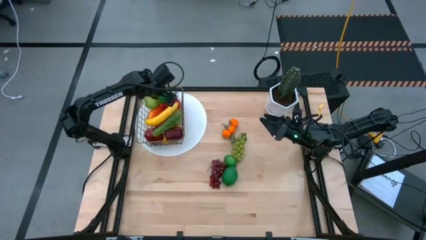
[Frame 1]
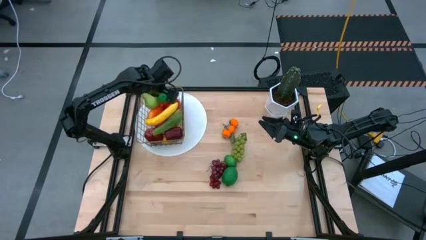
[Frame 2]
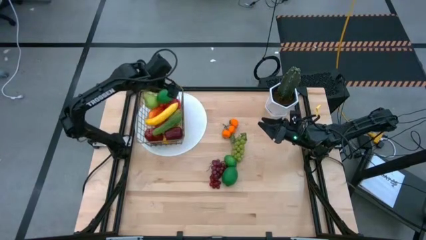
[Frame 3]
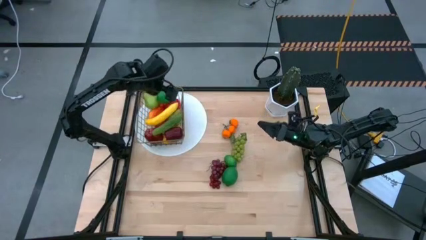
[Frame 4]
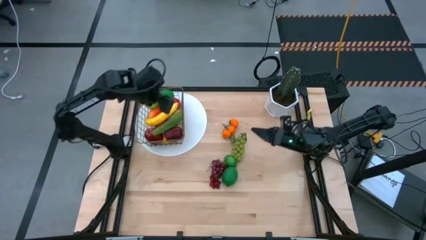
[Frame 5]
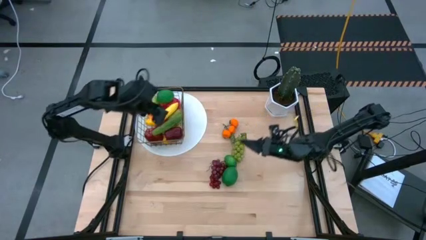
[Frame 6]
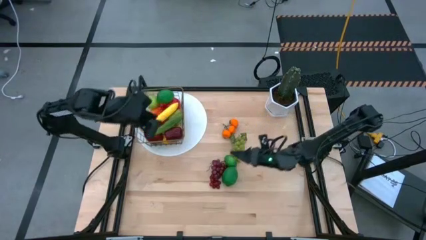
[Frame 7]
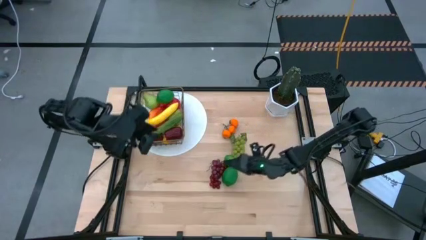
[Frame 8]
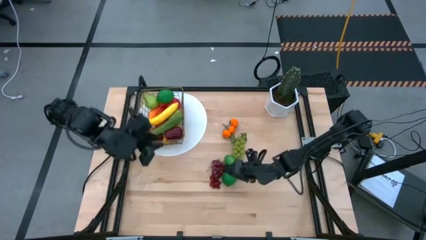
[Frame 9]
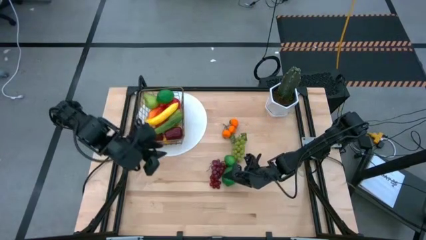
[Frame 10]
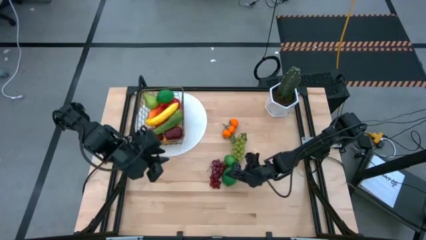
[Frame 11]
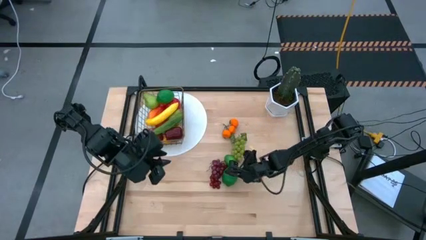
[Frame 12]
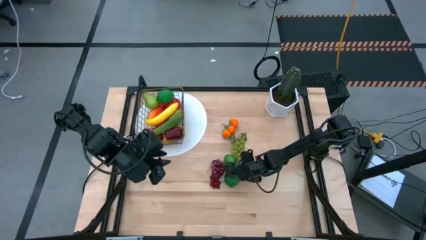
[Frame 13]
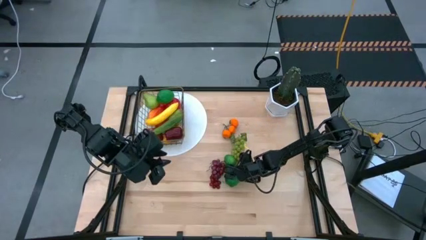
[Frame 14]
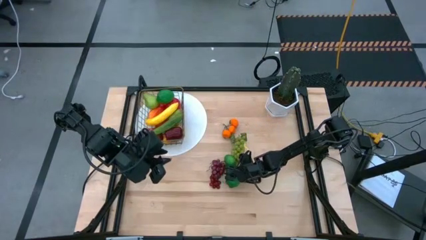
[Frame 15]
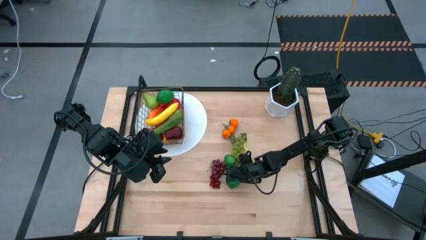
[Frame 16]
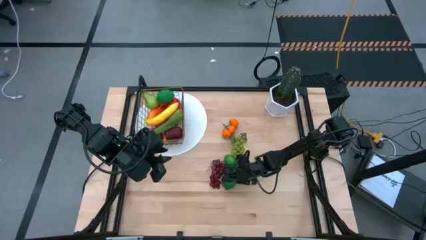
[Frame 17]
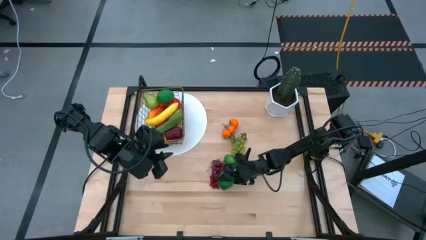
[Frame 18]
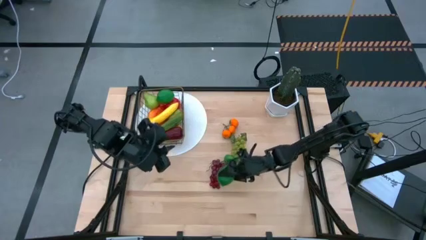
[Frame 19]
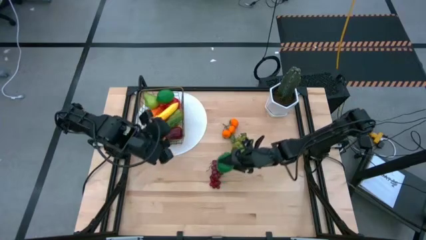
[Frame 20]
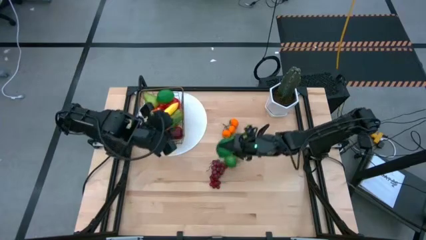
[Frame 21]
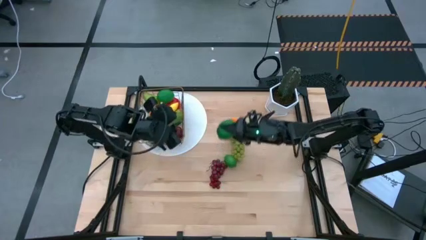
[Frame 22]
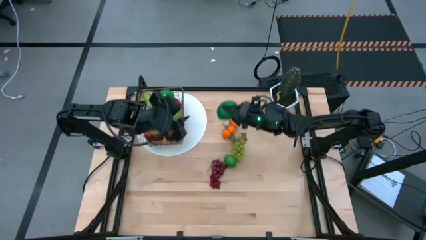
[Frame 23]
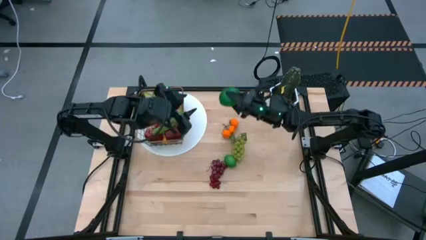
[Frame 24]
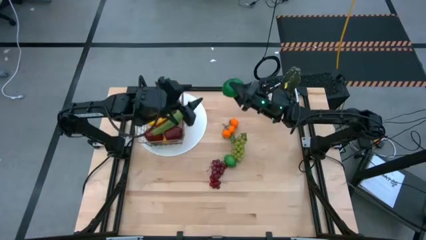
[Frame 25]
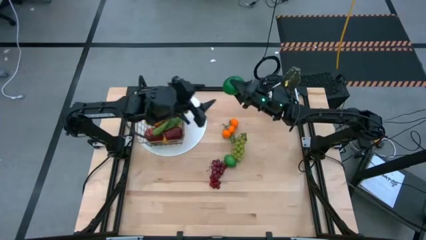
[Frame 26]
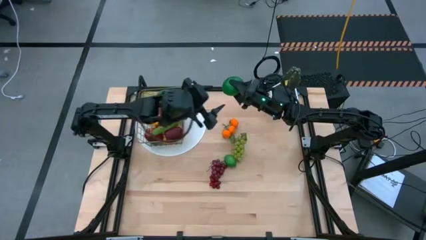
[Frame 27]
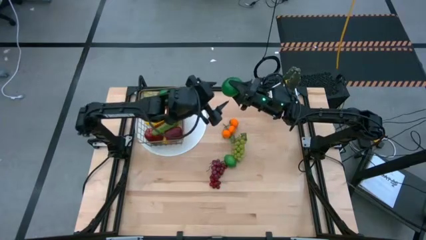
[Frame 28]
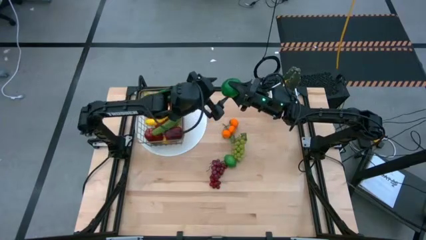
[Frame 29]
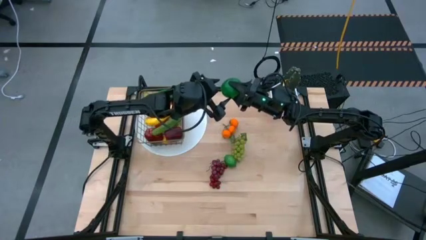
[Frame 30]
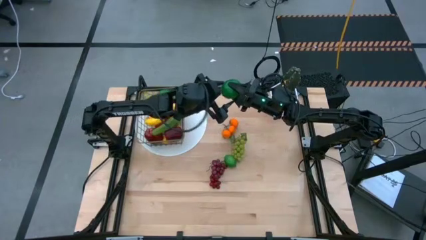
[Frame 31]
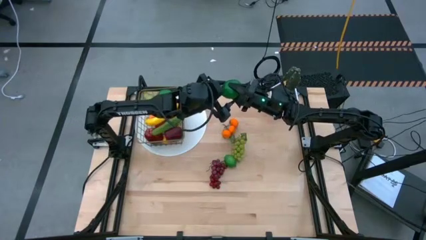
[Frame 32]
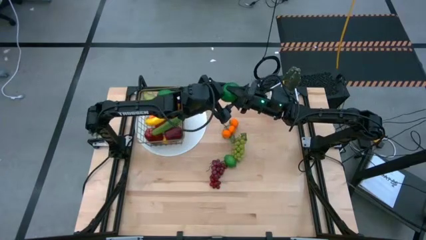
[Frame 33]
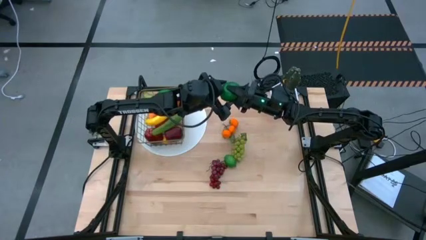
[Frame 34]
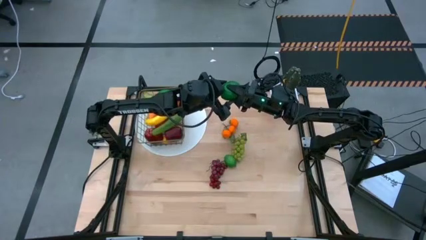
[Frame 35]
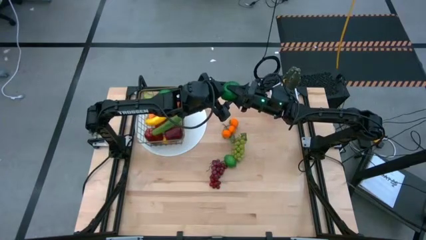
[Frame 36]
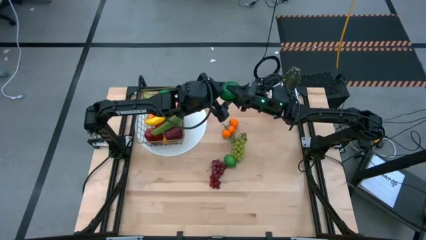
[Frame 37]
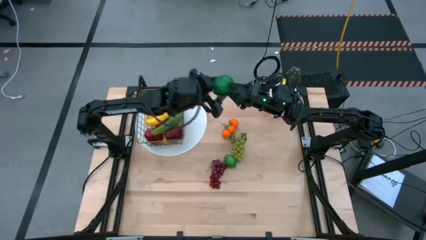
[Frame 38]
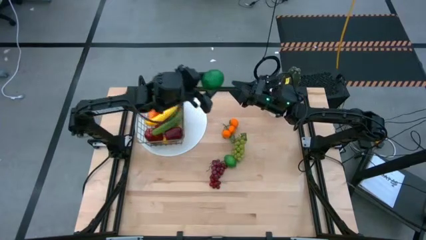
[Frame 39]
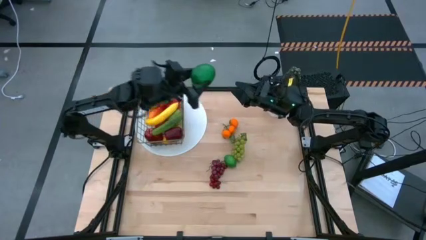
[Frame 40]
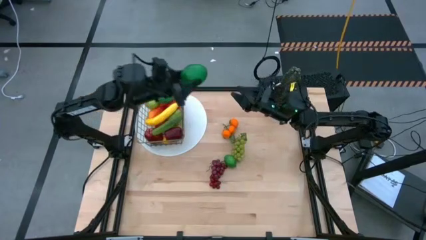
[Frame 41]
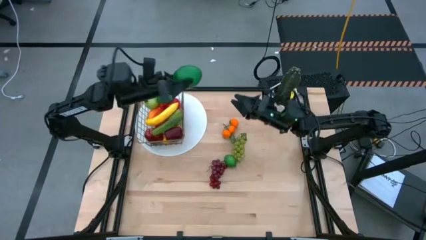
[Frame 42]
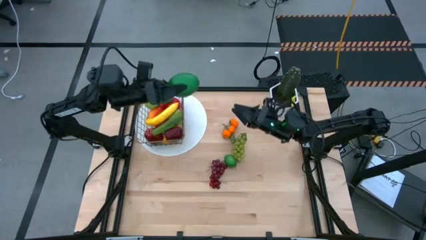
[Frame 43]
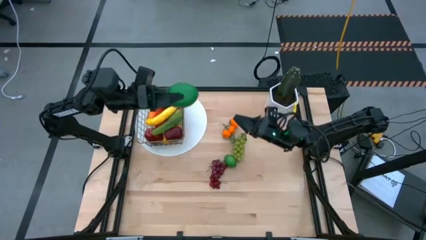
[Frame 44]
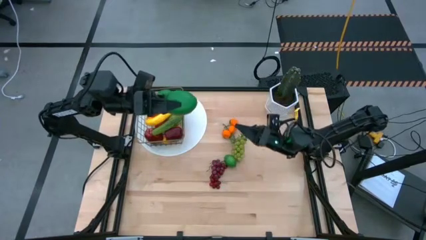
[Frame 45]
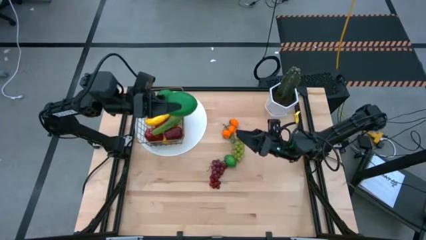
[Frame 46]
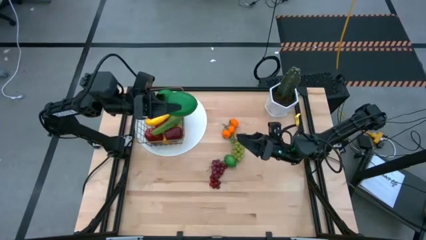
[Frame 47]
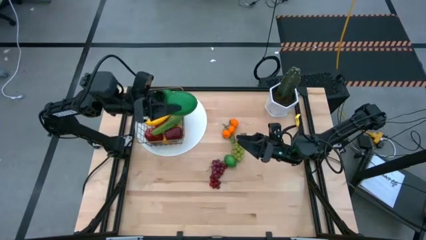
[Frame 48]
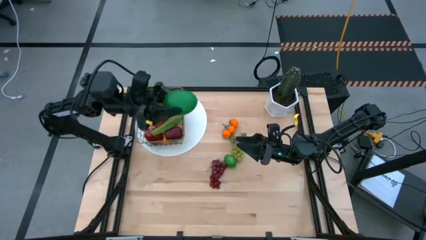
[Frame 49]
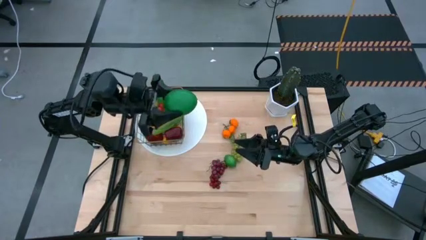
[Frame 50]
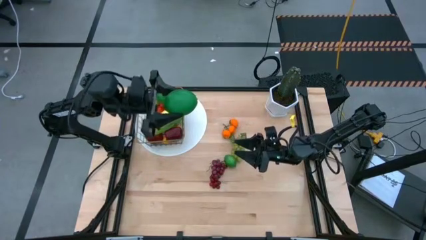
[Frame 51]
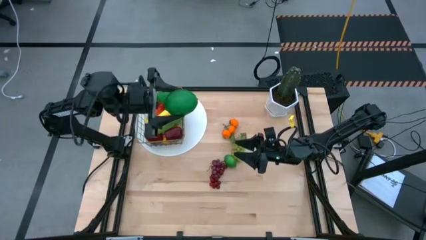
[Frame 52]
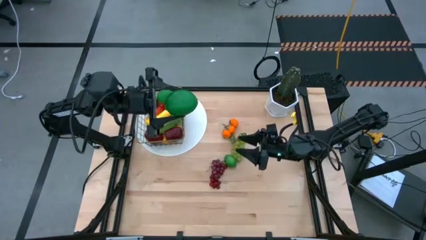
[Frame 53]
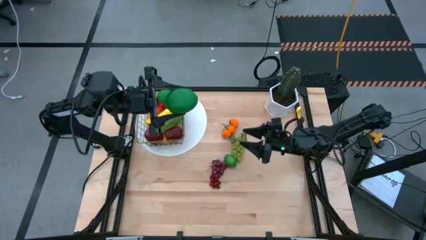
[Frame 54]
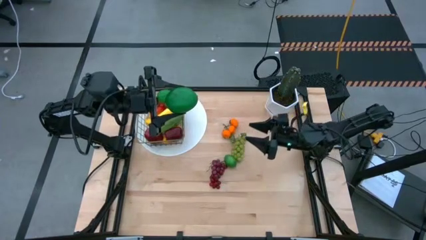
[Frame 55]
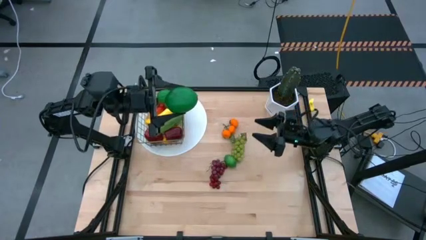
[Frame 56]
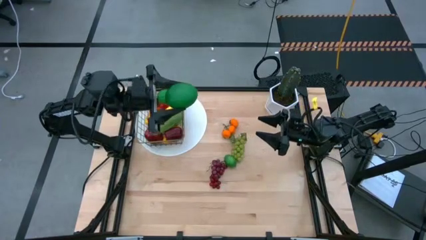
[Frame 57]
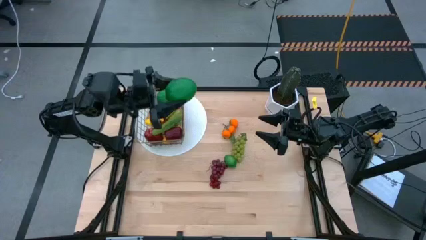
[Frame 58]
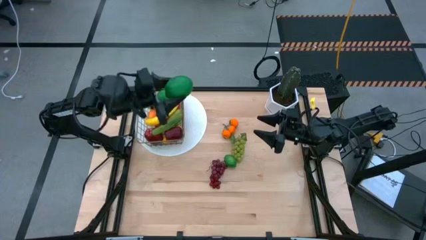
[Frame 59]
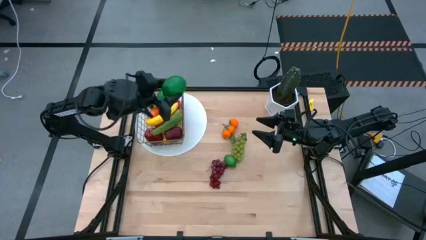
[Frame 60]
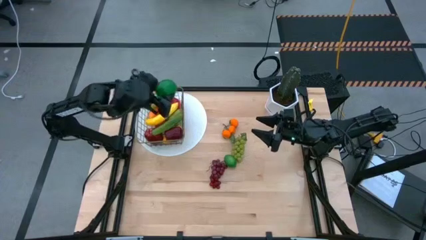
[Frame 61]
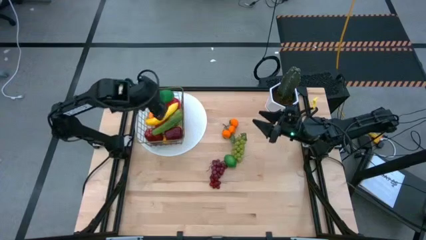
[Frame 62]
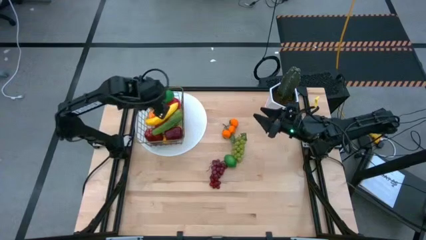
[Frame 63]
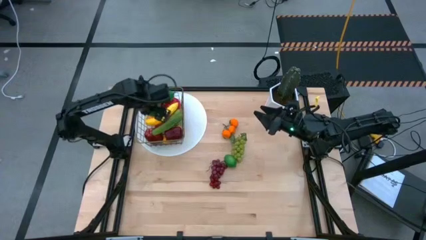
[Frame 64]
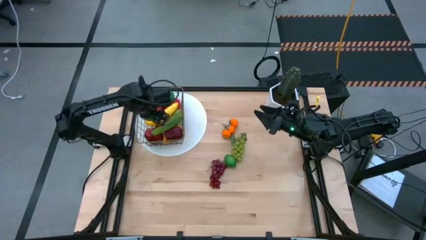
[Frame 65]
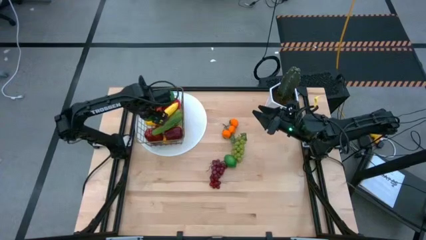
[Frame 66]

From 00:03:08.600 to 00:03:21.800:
Task: Build produce basket
Put the bottom green lime into the wire basket

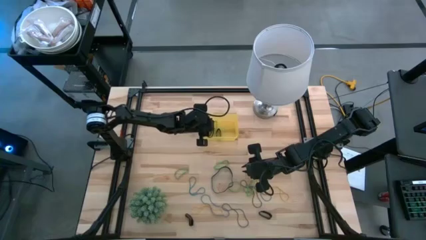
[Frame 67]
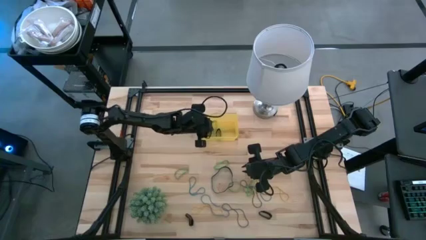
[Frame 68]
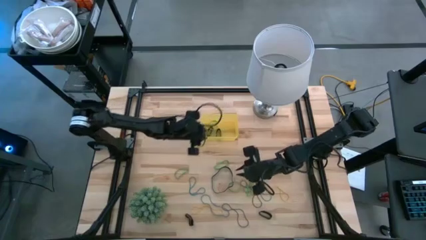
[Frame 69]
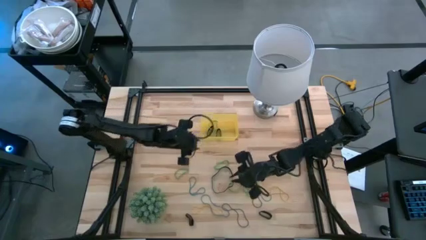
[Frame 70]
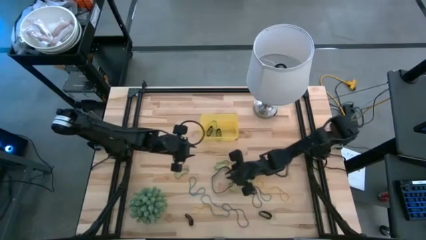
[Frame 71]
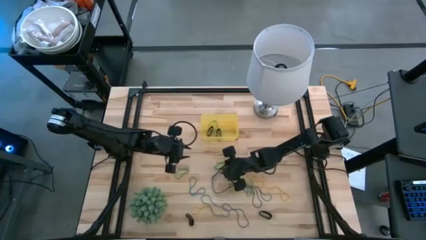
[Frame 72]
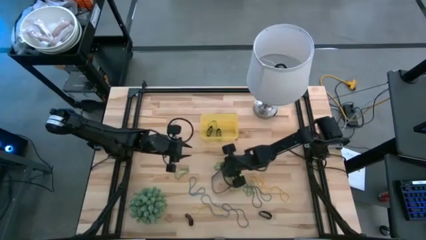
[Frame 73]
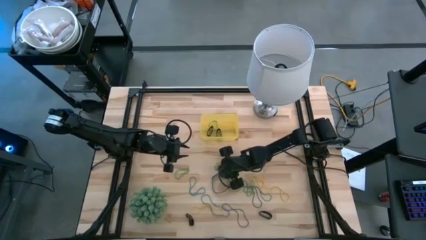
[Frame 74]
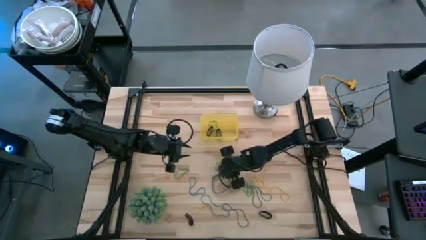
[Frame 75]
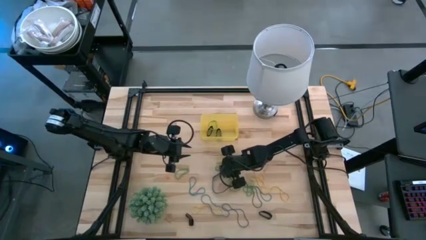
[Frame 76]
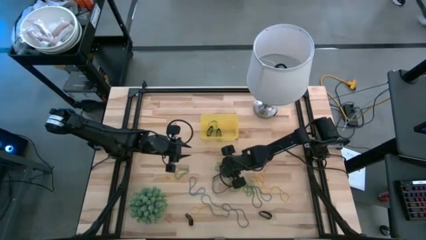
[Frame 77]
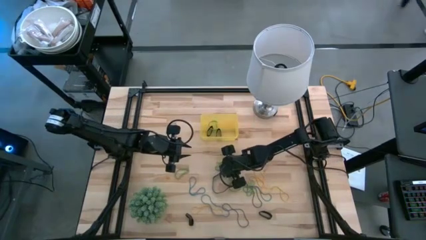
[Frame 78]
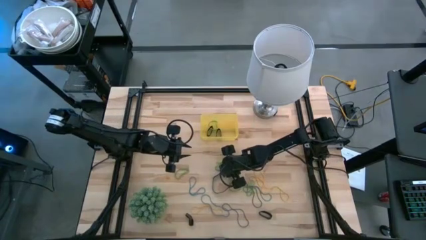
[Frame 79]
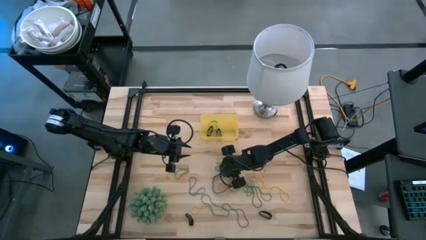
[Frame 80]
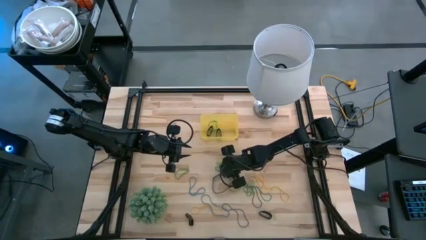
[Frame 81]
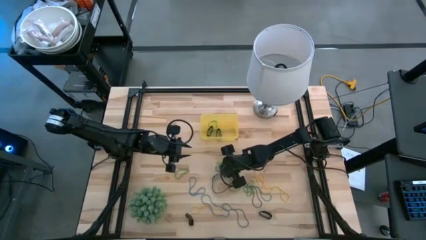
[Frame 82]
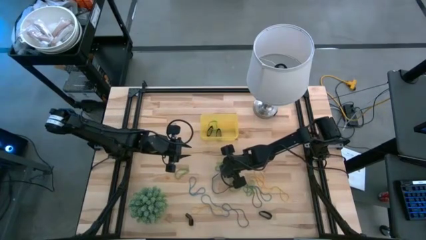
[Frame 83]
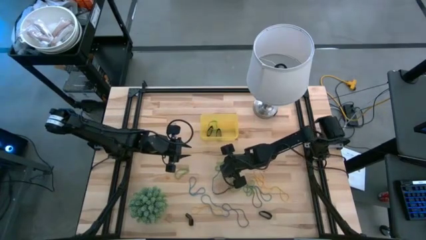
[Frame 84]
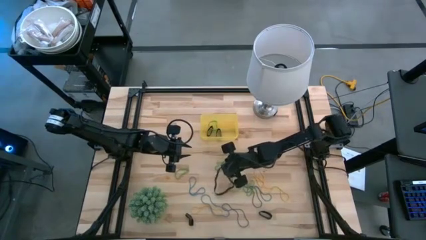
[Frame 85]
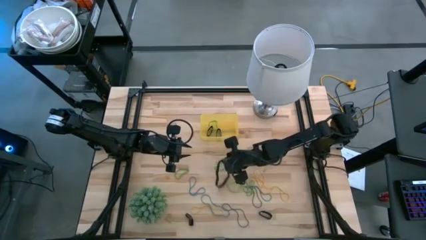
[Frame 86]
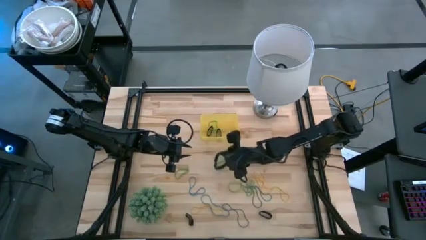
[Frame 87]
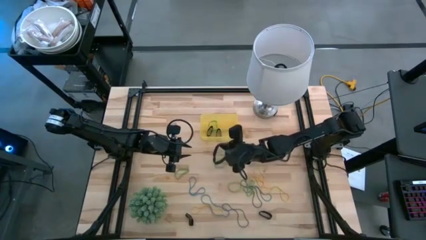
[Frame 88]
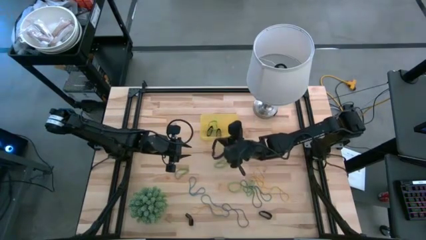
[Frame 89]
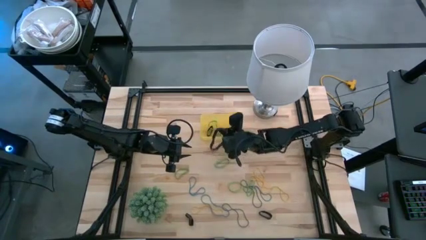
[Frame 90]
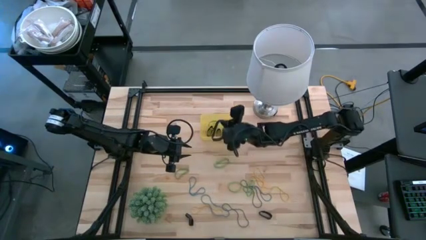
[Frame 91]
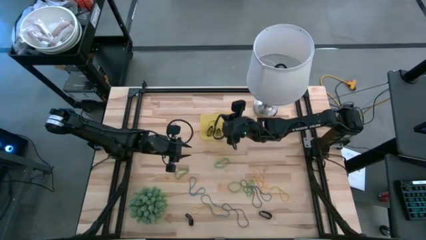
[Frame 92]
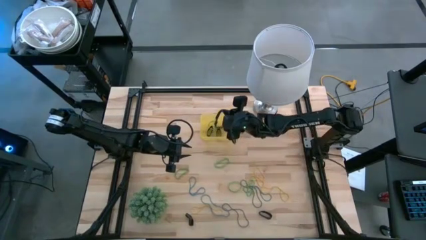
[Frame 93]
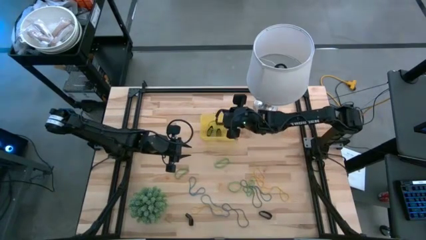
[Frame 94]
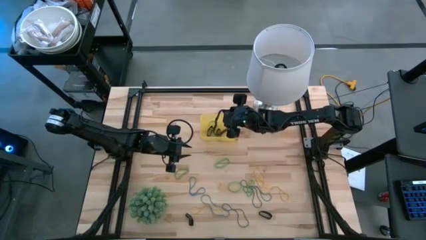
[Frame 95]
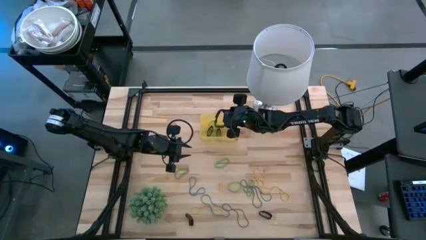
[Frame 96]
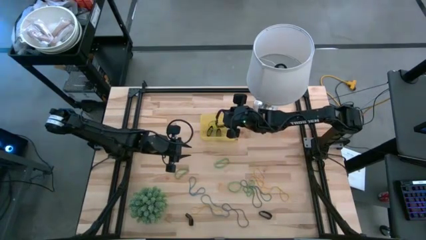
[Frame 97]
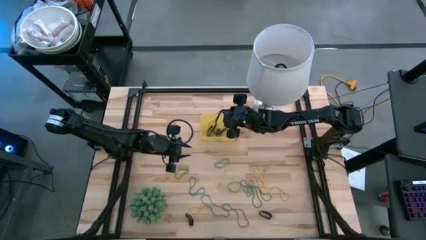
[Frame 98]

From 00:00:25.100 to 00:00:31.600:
Task: Pick and place rubber bands into bin
Put the black rubber band into the yellow bin
